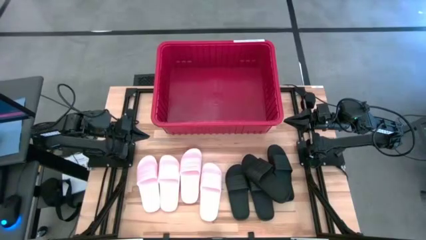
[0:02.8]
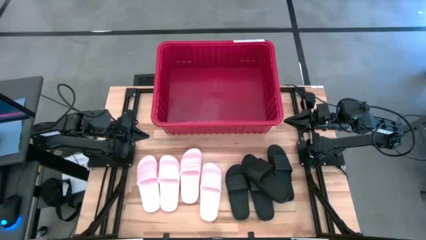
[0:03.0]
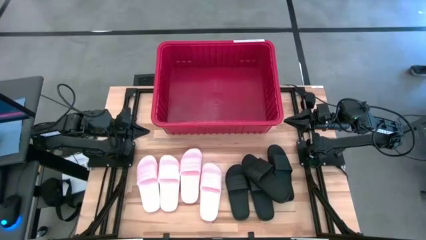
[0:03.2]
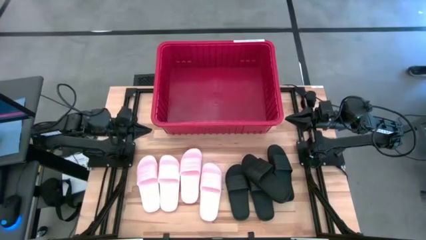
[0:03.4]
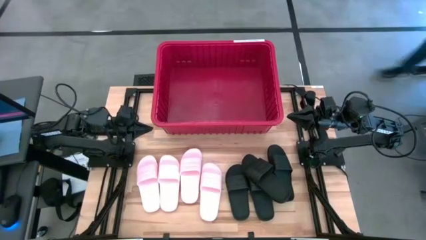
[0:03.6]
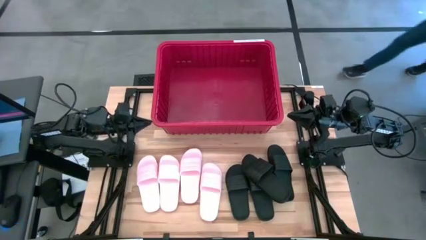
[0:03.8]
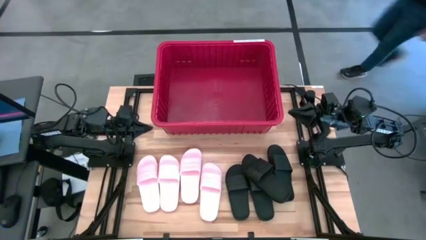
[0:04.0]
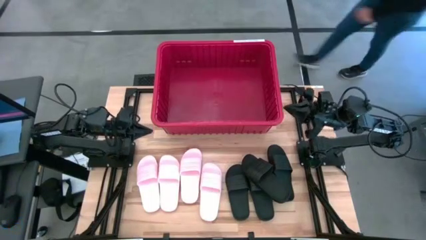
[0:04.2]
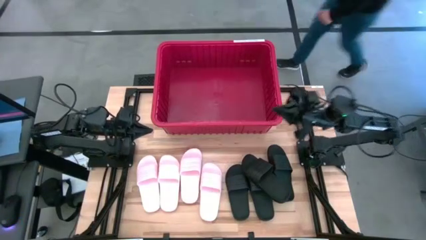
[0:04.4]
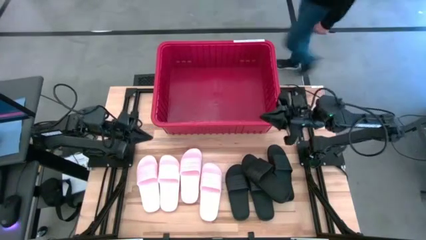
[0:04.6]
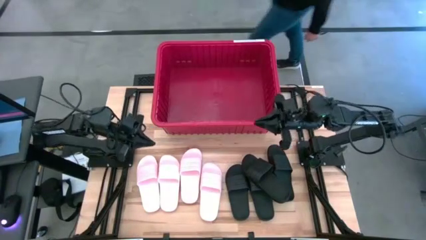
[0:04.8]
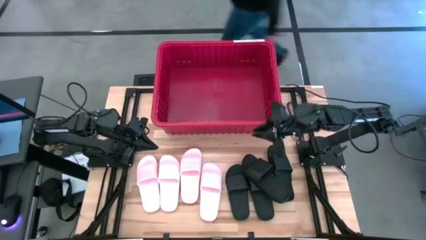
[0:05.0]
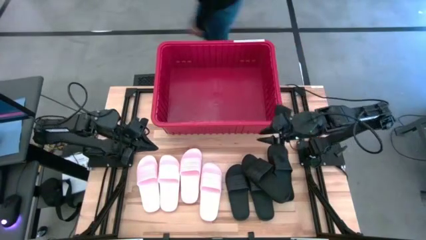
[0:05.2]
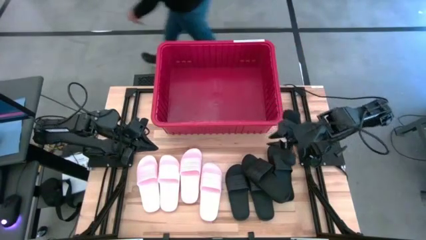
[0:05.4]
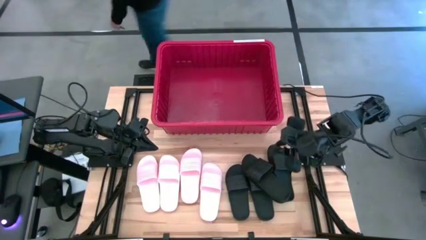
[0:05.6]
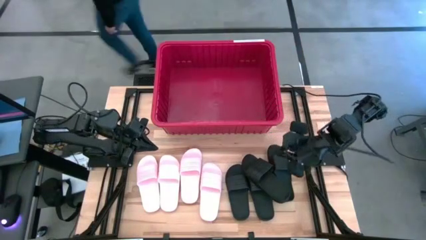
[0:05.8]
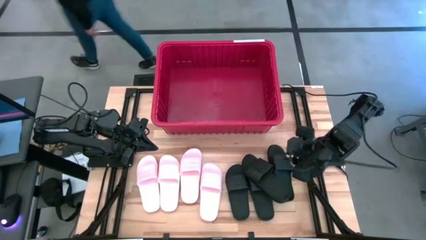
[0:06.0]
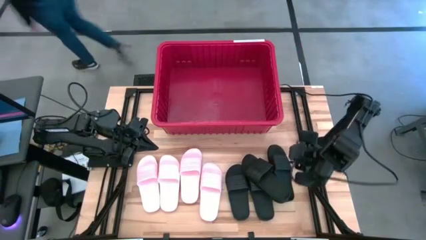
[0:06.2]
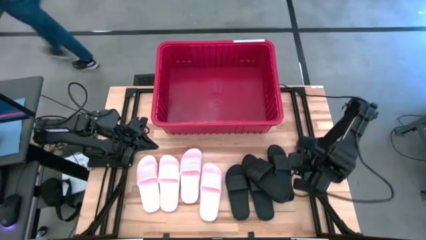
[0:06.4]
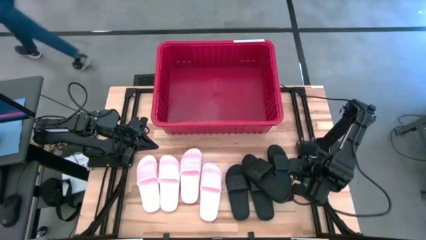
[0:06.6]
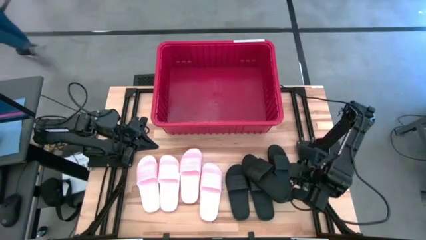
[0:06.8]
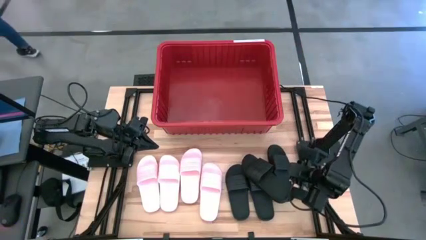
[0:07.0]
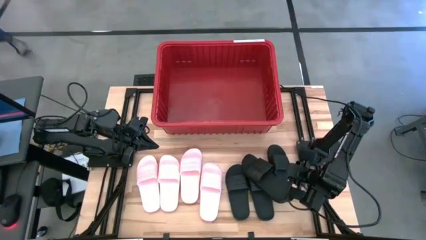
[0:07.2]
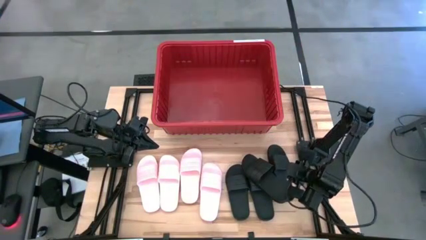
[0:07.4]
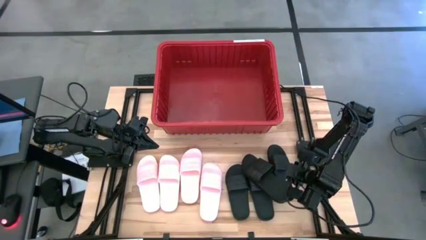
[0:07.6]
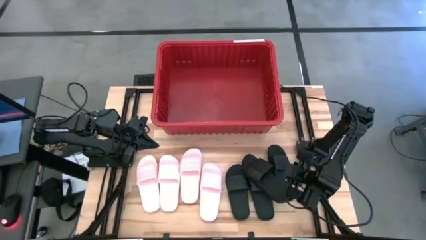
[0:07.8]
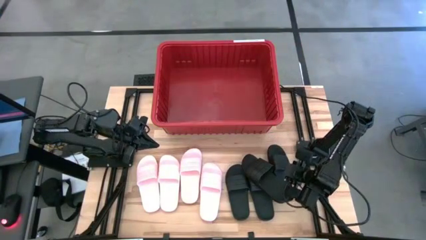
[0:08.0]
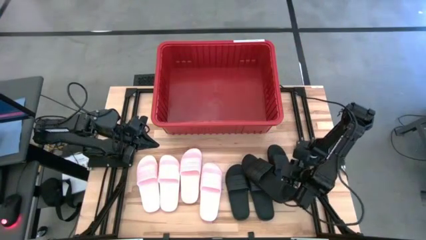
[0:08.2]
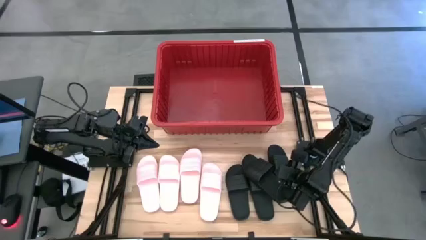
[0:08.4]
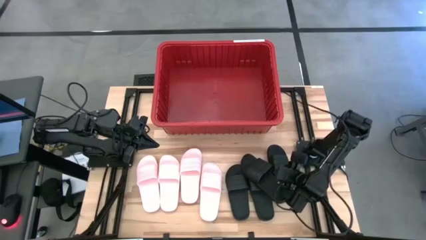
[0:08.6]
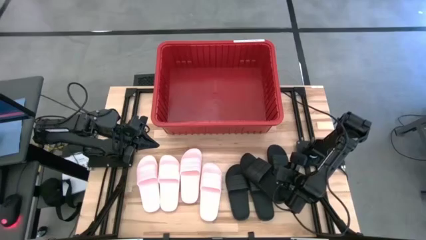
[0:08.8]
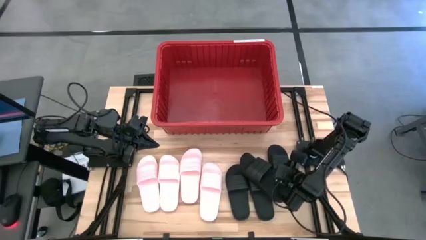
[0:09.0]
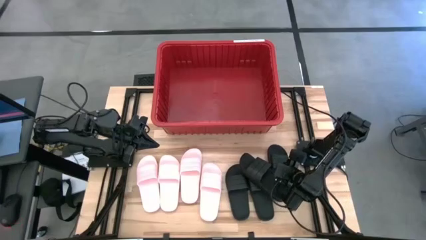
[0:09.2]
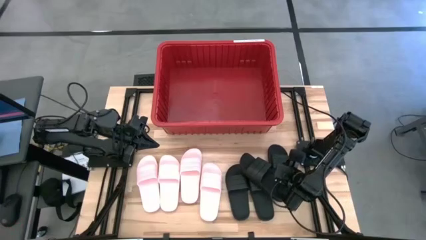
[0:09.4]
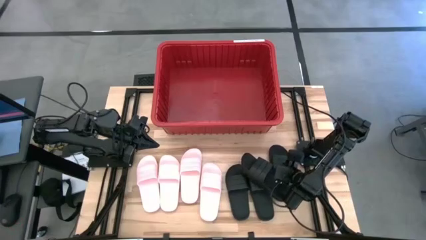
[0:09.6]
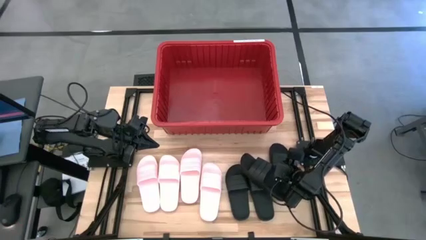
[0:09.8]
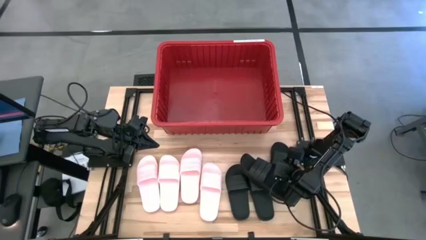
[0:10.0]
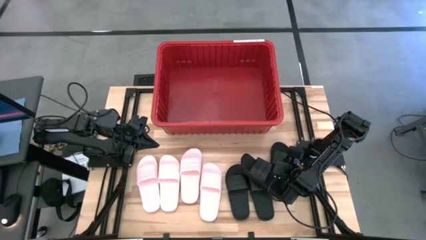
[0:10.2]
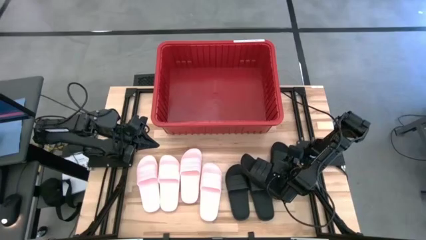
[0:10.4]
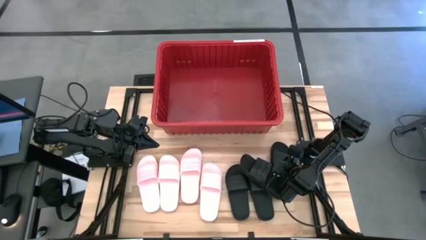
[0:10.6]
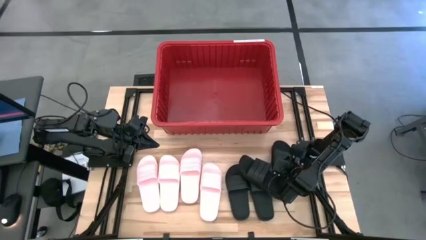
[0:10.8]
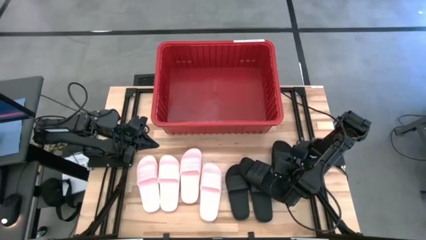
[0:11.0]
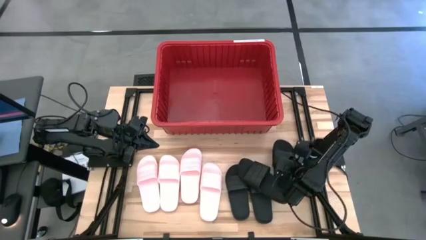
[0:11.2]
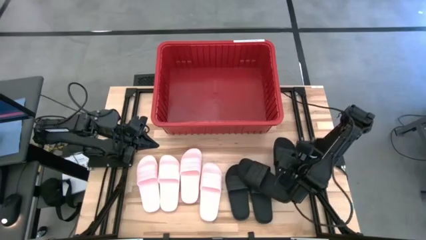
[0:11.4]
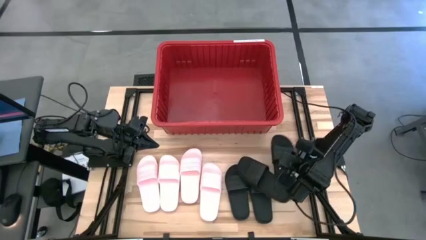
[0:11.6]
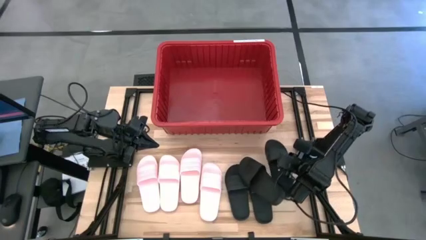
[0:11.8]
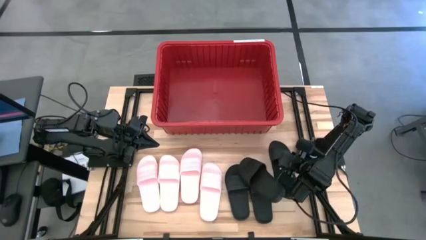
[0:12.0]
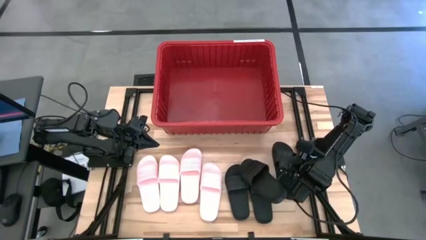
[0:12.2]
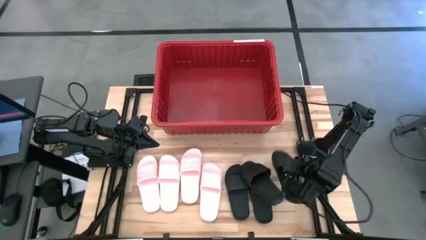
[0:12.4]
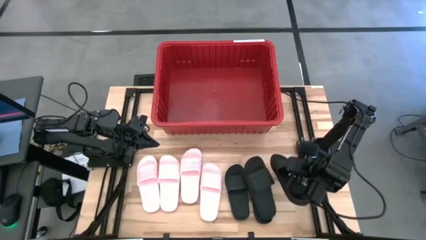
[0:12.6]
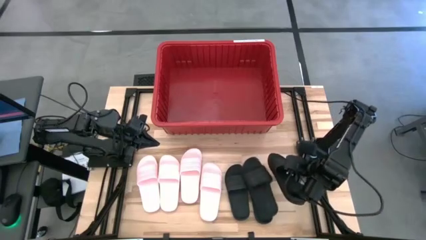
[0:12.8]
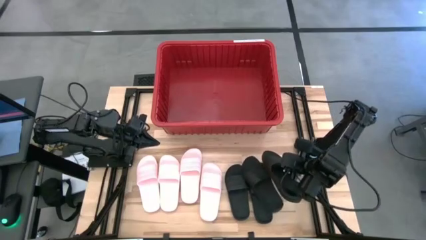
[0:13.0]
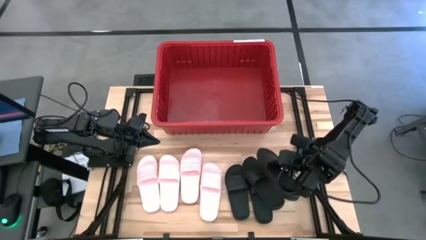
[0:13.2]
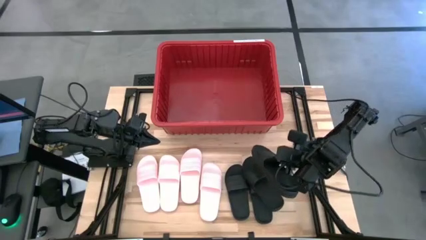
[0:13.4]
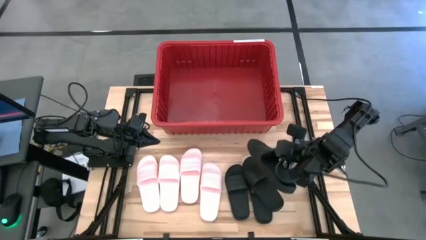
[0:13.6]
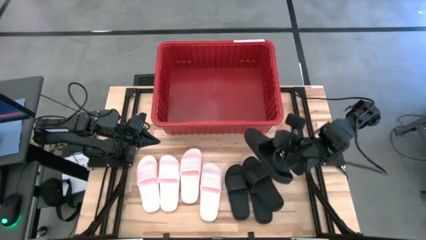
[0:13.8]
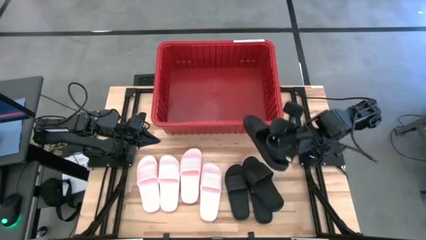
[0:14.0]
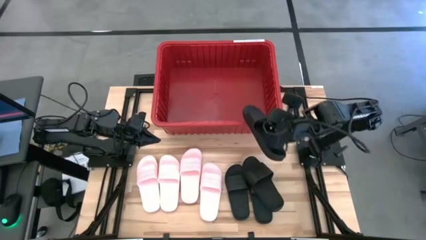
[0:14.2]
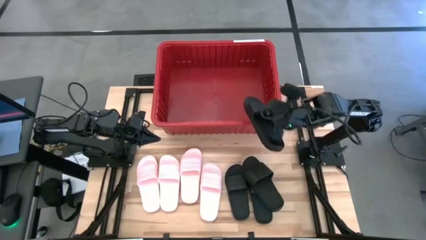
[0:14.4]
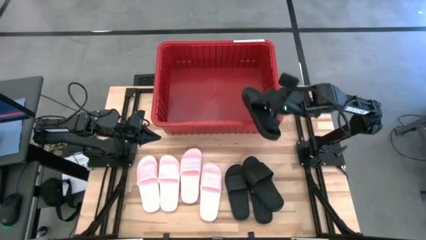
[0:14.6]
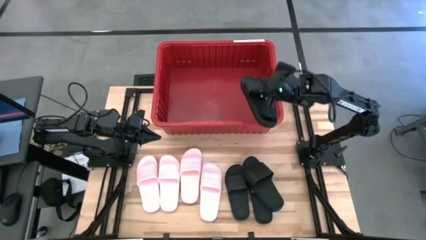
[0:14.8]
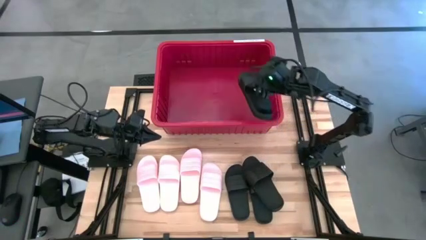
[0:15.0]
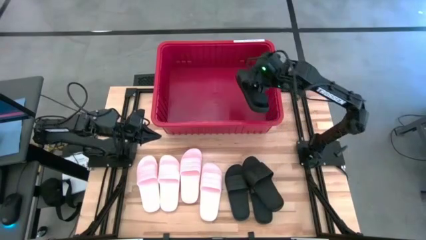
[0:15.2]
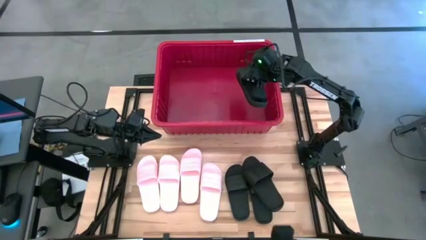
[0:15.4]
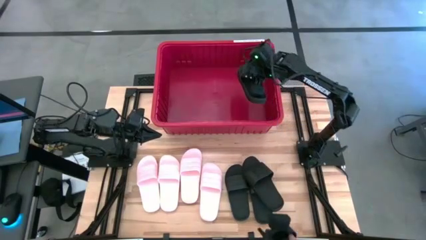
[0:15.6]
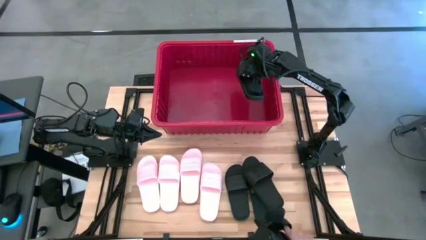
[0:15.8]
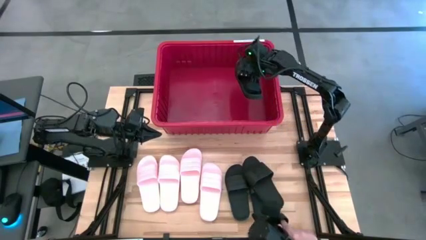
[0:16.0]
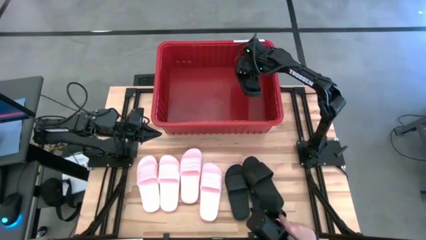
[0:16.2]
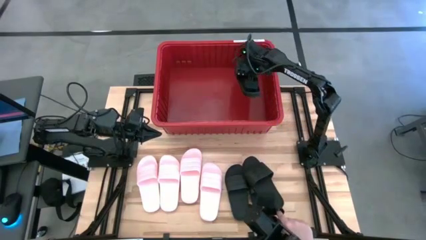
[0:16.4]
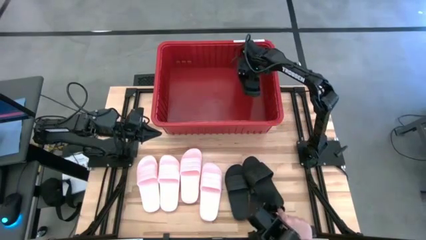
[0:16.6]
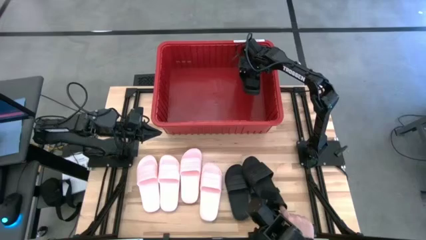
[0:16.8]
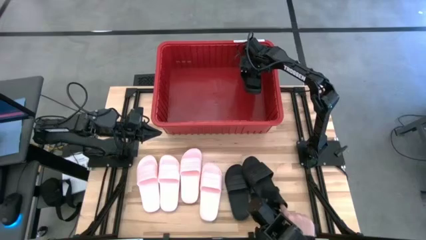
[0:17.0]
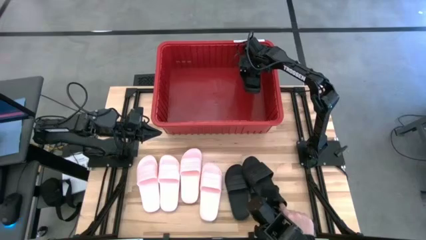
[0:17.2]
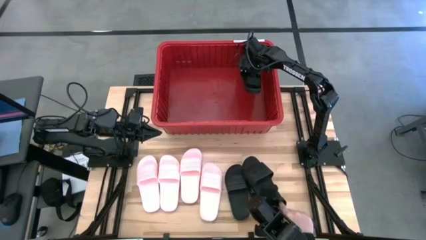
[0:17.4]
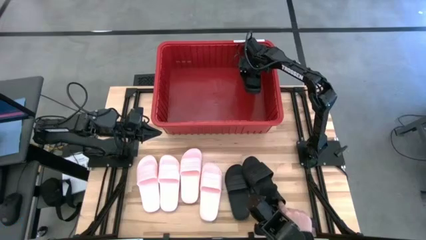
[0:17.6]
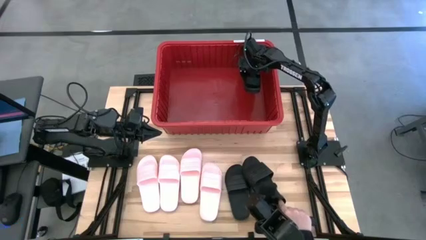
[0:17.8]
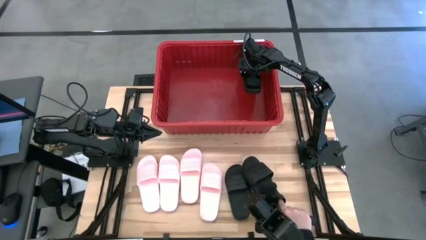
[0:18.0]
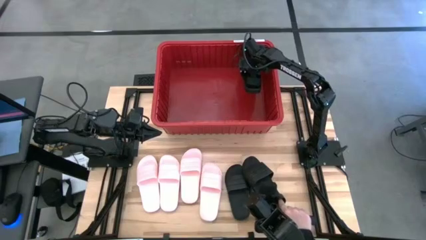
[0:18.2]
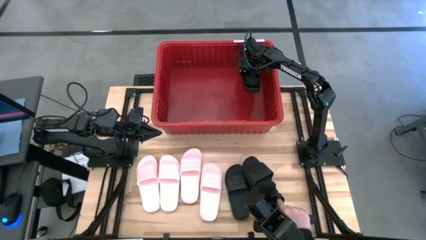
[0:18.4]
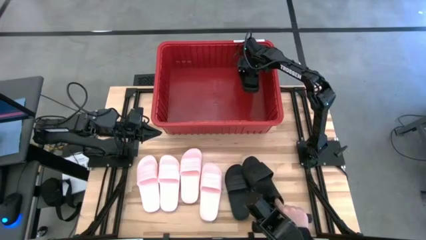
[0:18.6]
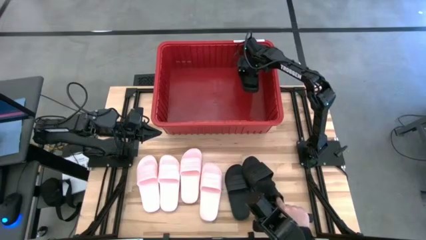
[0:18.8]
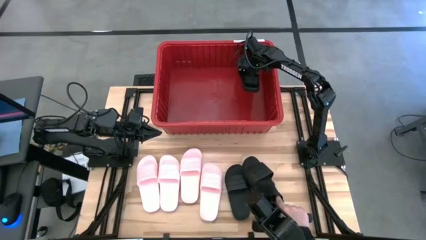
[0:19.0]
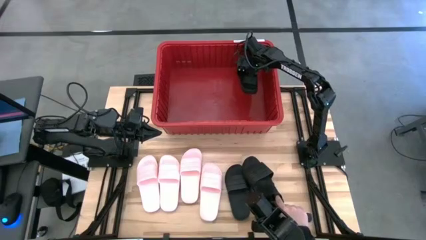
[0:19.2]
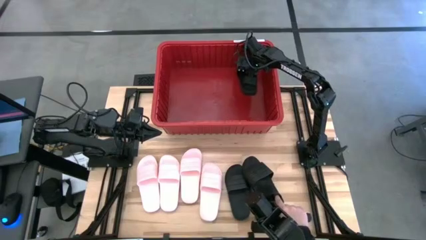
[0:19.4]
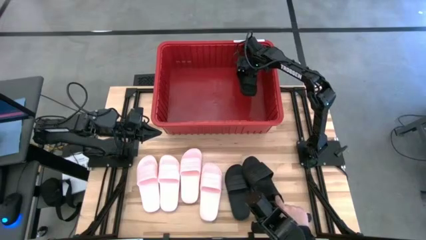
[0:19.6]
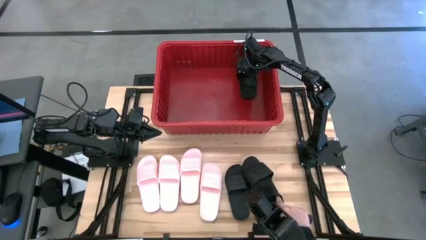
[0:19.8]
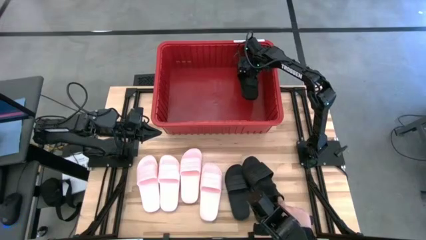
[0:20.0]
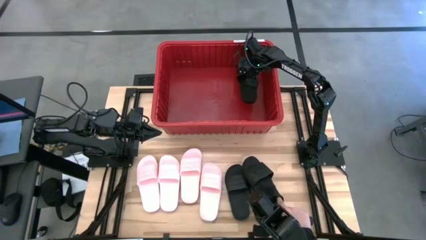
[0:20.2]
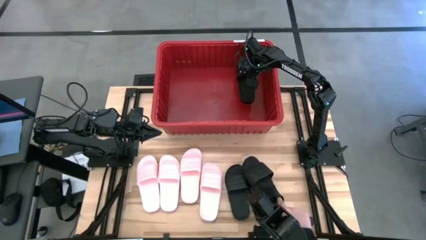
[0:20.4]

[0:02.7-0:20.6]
Task: Pick and place slides into bin
Put the black slide into the red container
